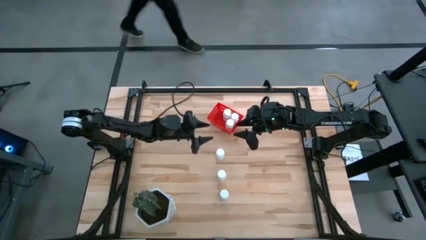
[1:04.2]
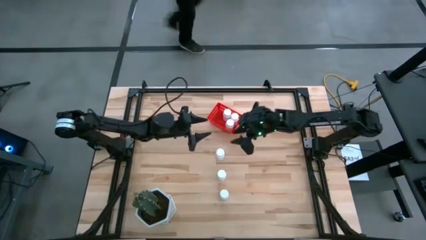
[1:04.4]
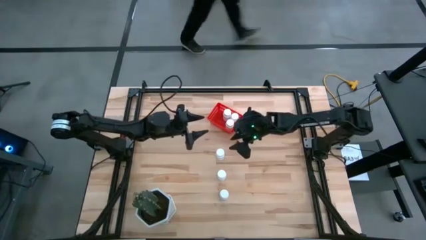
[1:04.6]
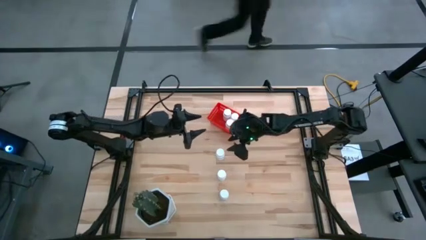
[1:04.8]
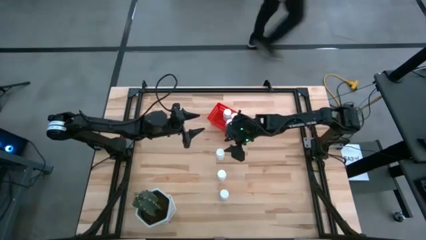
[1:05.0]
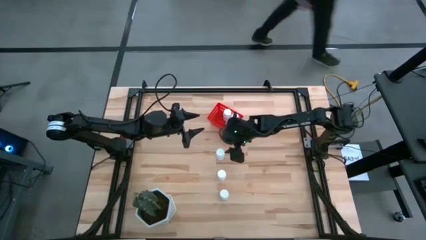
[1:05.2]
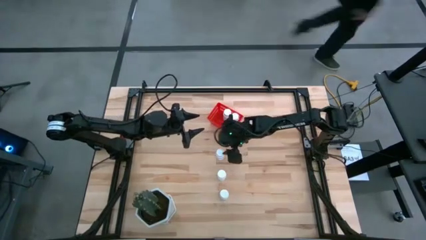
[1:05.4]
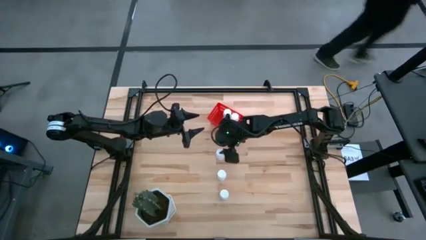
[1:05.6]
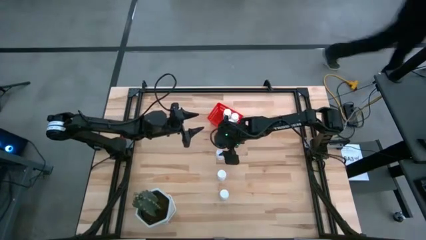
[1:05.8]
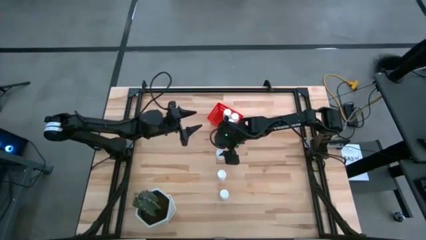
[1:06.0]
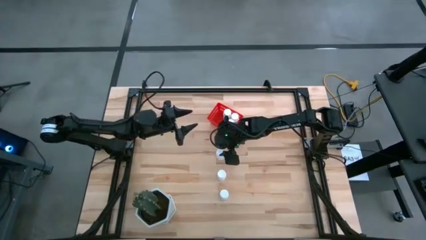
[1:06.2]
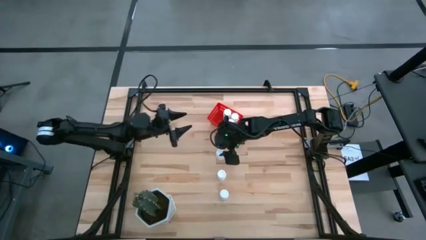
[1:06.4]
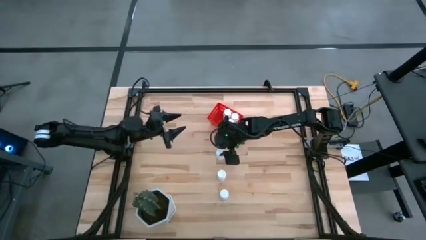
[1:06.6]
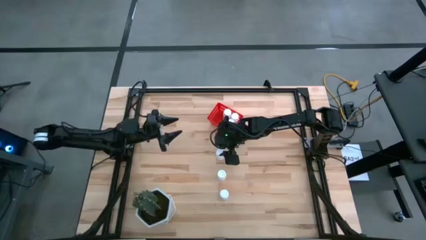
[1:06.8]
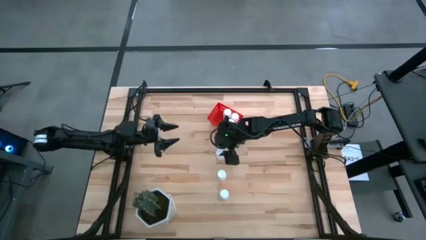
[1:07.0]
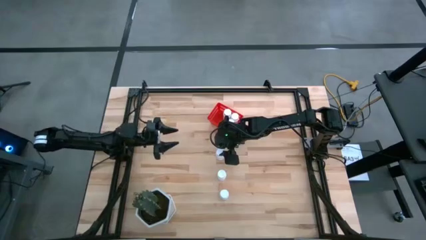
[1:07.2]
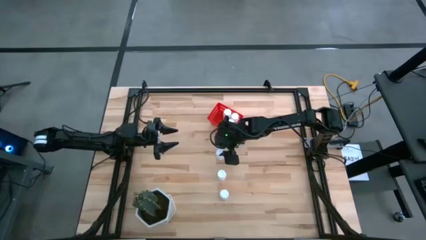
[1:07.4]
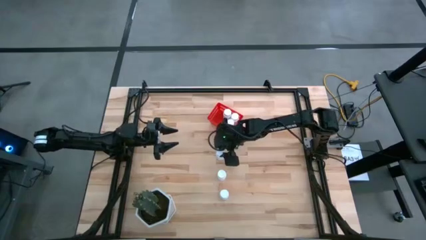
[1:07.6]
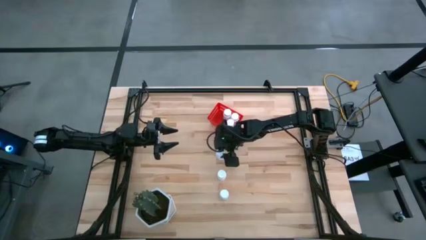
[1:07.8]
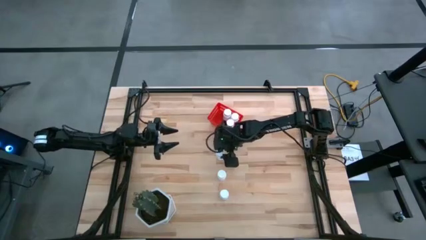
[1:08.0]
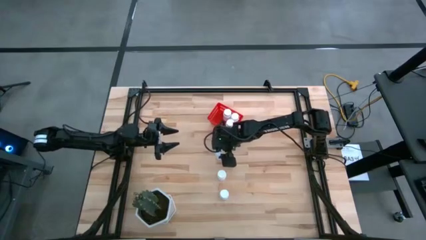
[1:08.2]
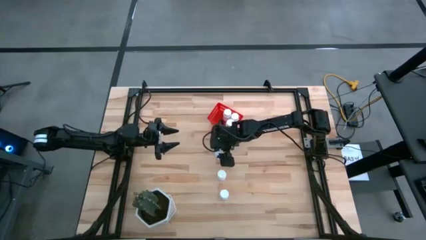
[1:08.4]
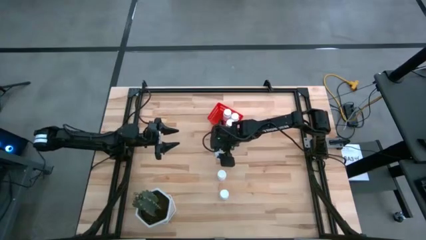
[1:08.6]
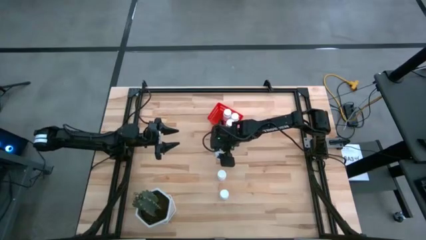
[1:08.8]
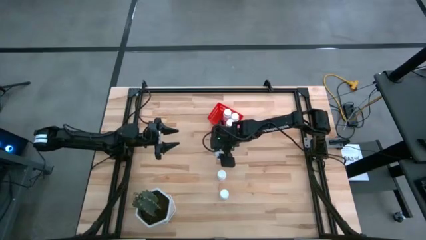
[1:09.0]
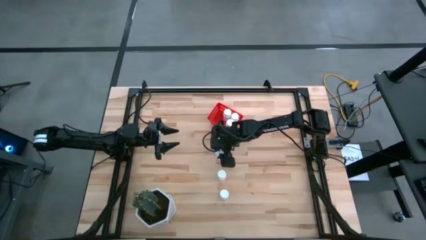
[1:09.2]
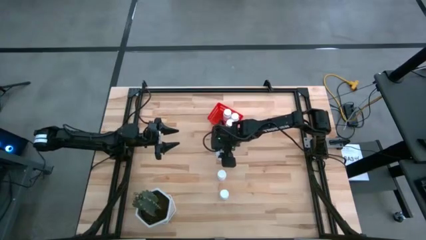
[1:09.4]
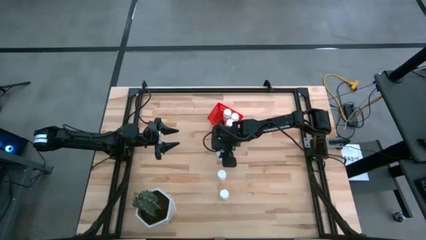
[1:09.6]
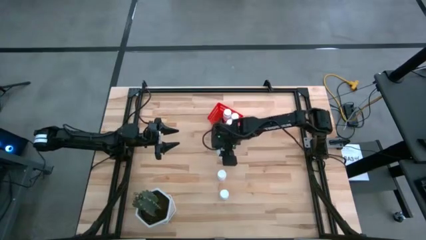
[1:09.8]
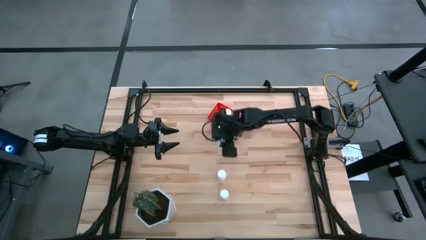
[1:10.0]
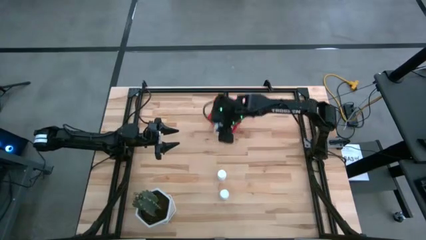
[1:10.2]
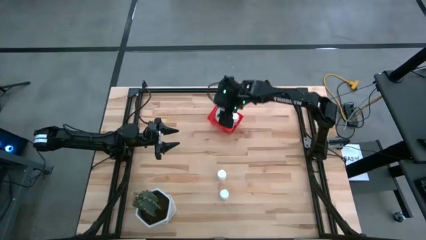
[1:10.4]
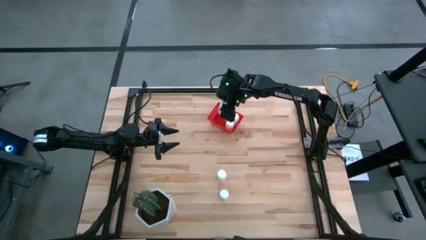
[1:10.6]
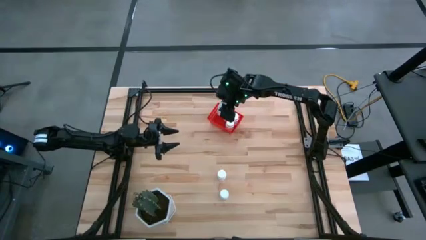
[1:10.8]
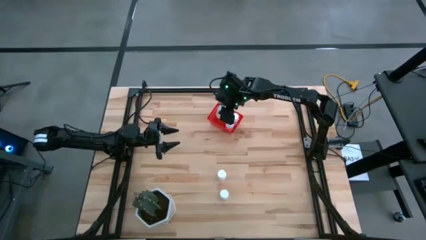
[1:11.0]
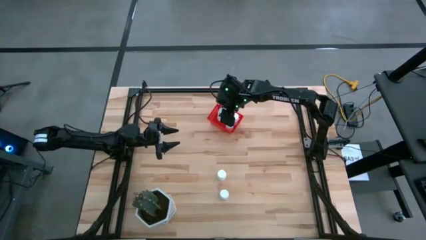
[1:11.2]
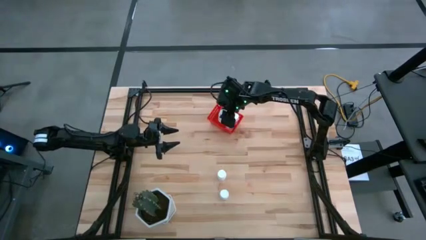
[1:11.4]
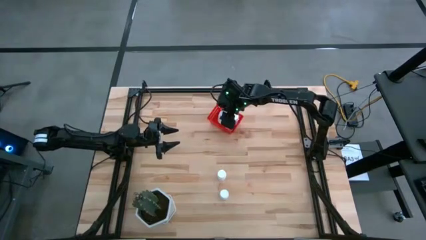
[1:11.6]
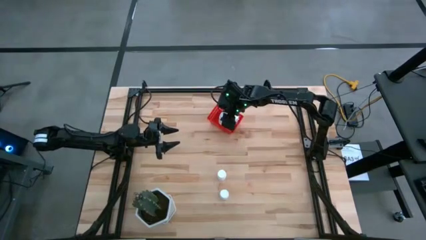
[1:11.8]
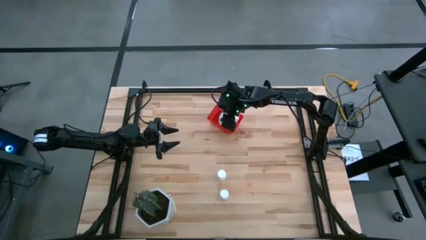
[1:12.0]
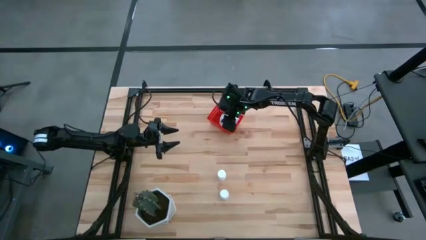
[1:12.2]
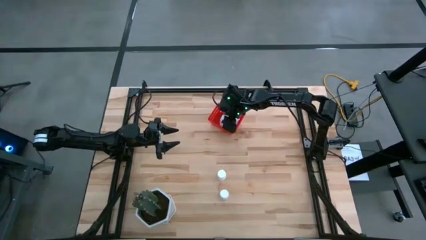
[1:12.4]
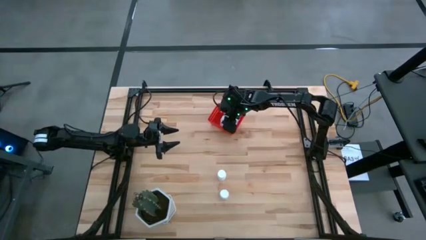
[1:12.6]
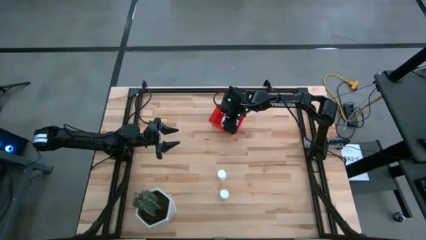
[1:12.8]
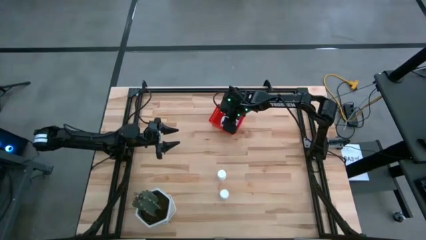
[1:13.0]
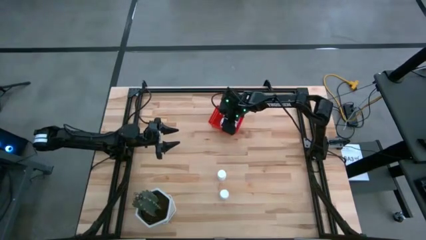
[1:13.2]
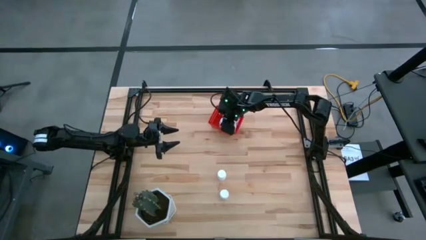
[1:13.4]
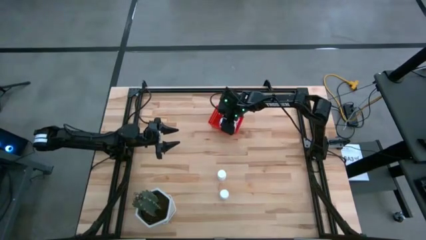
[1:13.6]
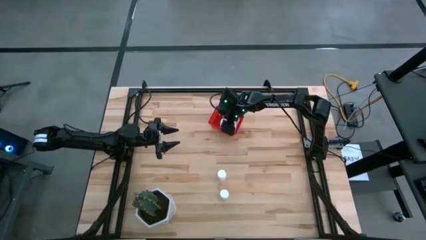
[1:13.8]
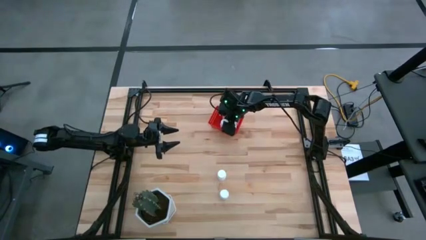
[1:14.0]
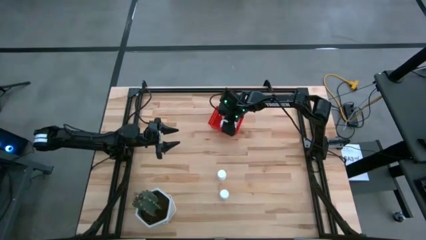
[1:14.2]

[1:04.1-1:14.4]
Task: Pick and place pill bottles into a basket
Put the white pill bottle into the red bin

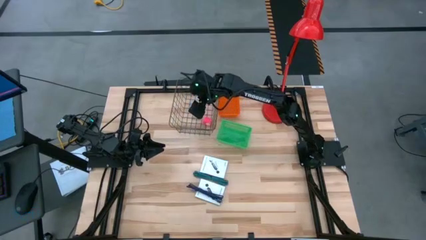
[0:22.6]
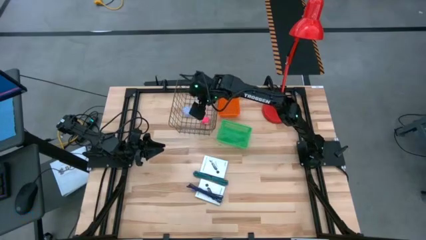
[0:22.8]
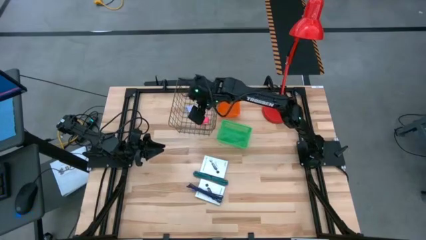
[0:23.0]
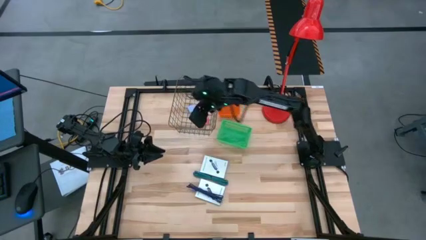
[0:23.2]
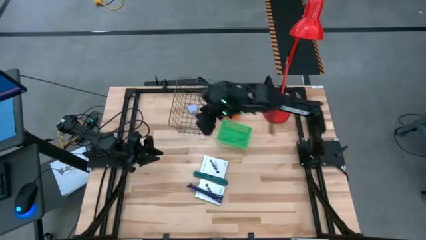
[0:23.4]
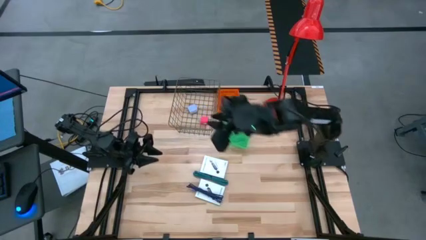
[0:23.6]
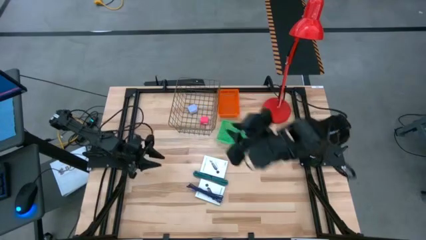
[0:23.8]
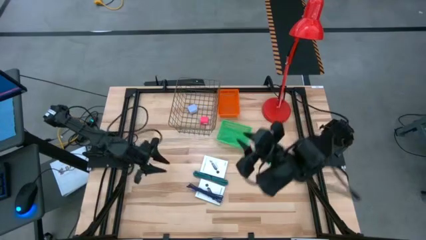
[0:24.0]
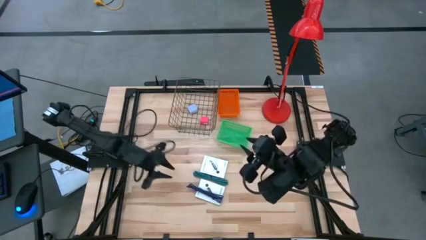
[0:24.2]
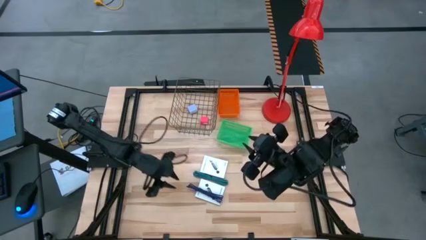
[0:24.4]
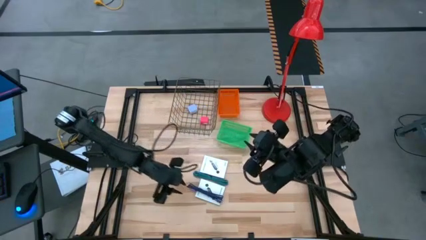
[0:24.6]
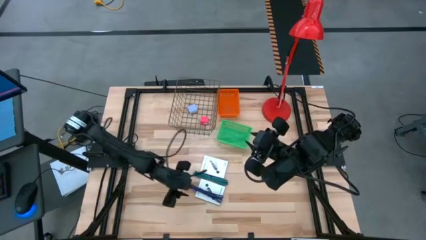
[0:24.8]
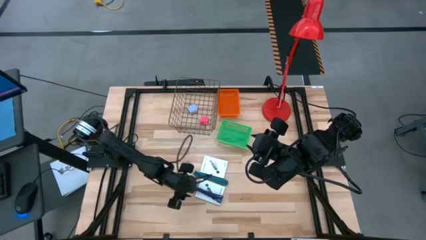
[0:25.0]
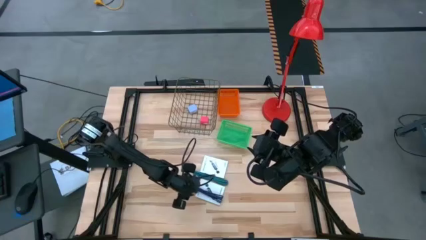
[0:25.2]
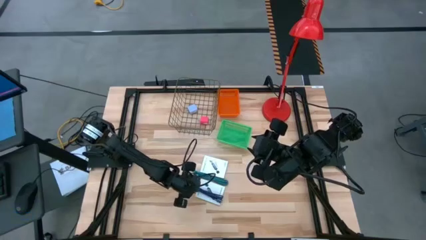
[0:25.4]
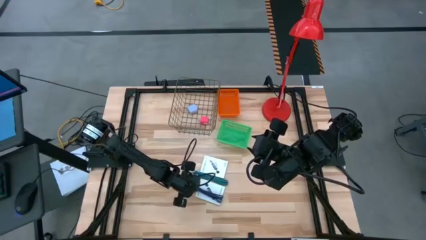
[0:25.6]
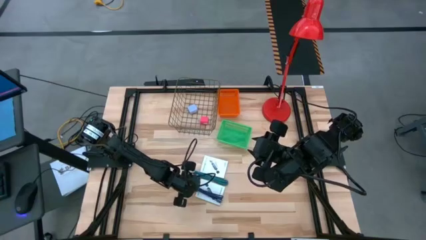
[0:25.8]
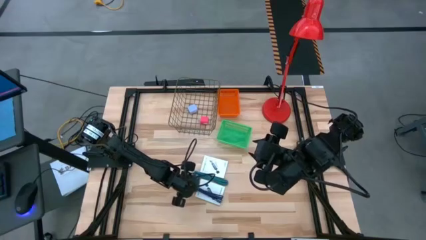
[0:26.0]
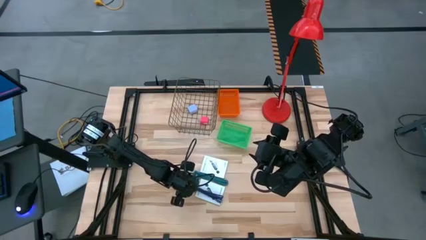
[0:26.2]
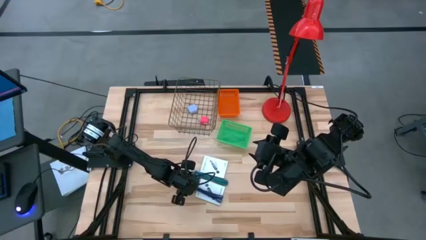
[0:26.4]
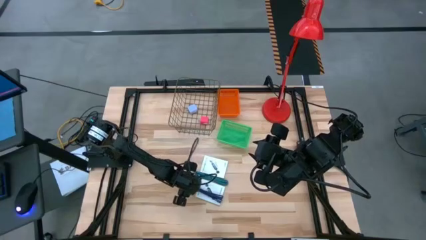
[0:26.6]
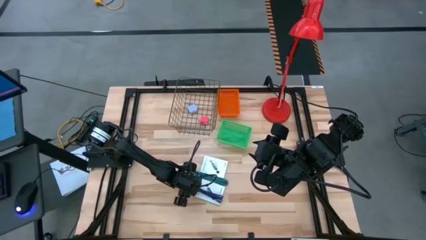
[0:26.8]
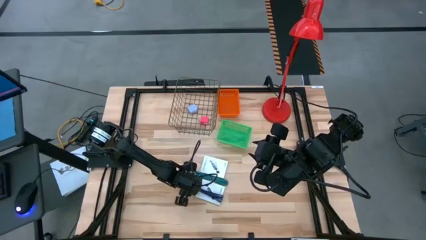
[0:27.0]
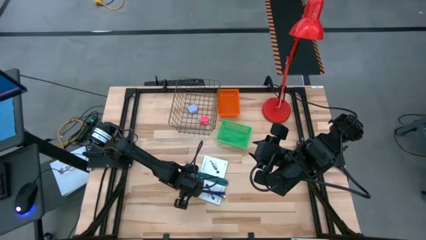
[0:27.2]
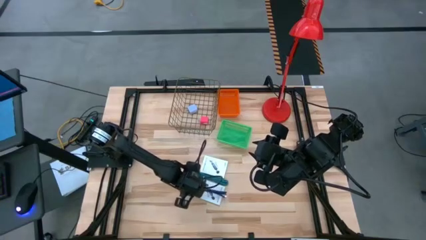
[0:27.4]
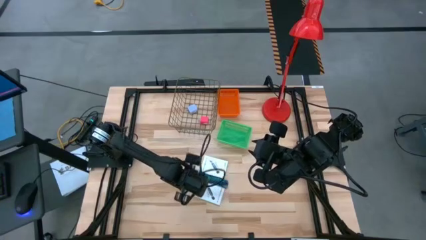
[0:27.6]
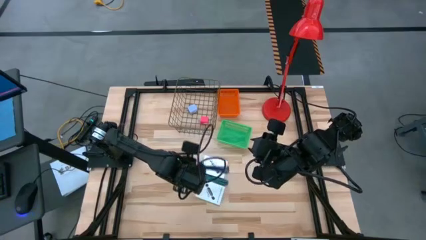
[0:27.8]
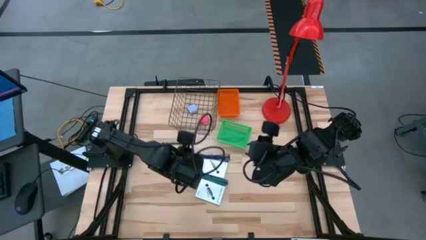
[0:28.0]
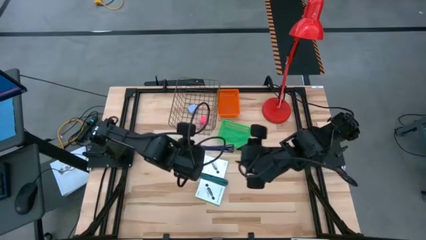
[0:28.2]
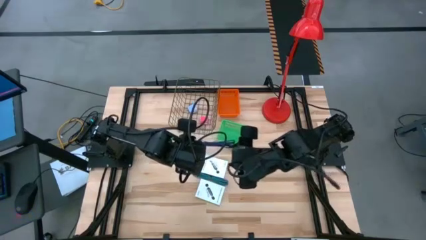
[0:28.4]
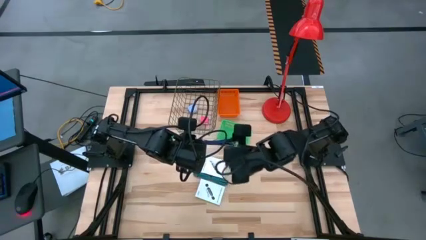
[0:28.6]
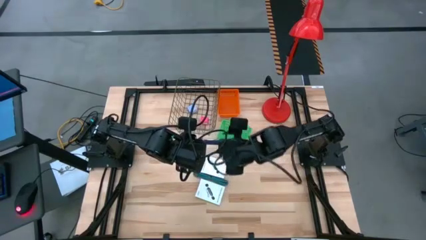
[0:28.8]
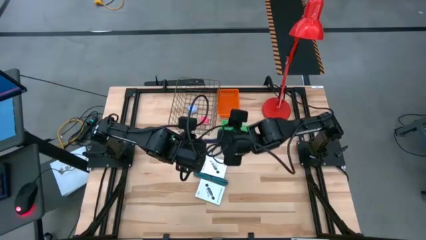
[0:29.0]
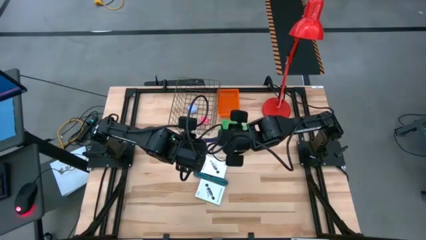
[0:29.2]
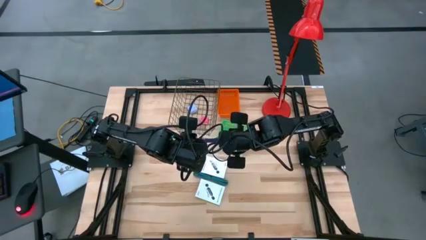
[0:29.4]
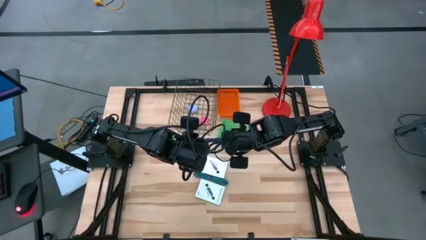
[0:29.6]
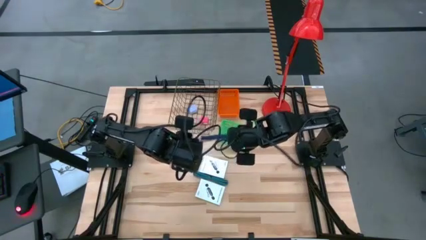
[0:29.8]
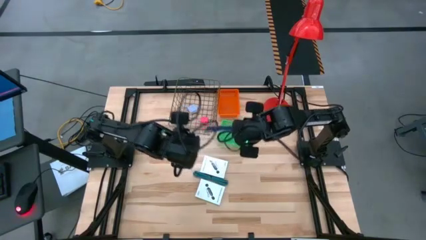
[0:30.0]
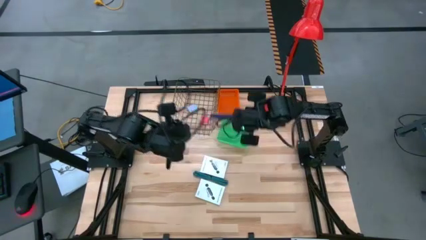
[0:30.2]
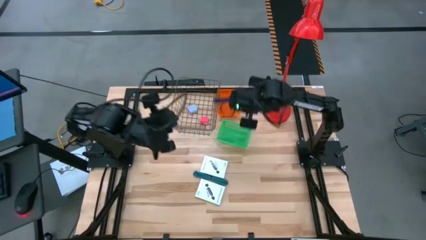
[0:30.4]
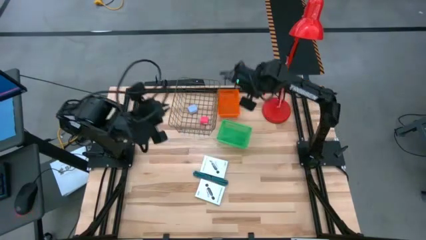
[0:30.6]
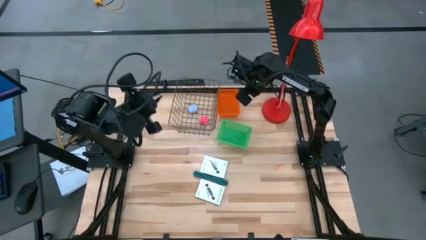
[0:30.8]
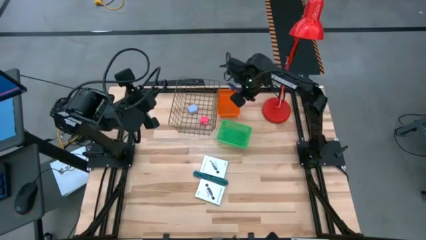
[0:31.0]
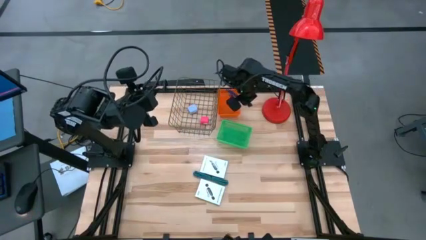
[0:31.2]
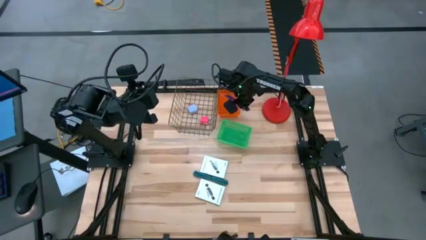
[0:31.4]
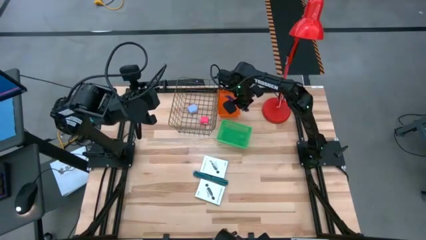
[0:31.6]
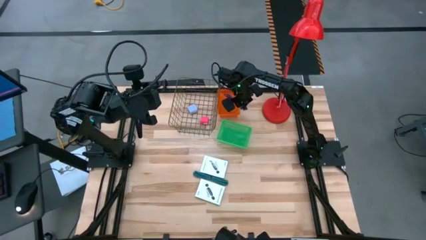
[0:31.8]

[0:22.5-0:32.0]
Task: Pick and place items into bin
Put the purple charger cable into the orange basket
